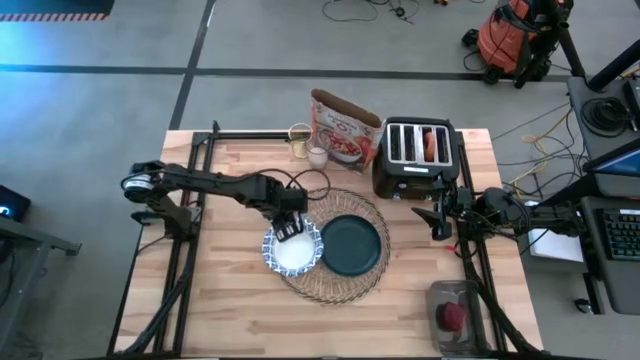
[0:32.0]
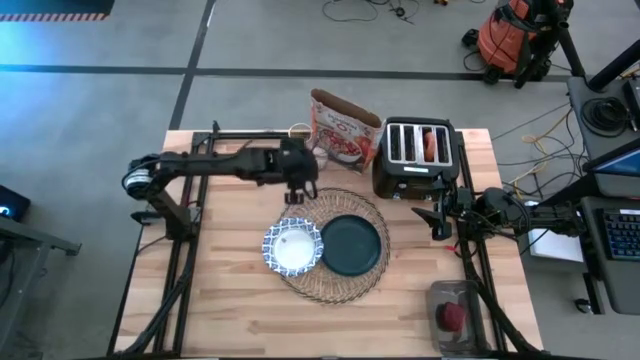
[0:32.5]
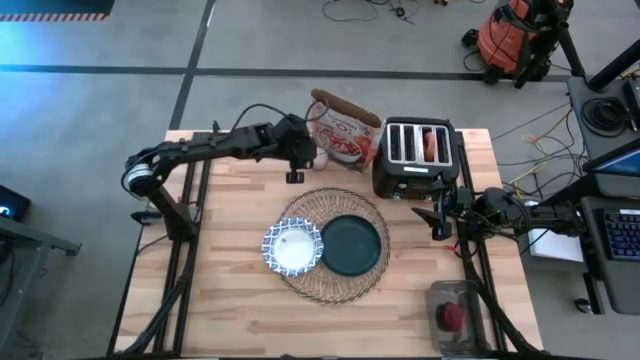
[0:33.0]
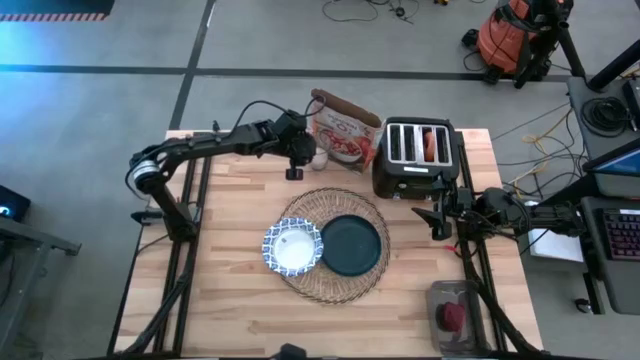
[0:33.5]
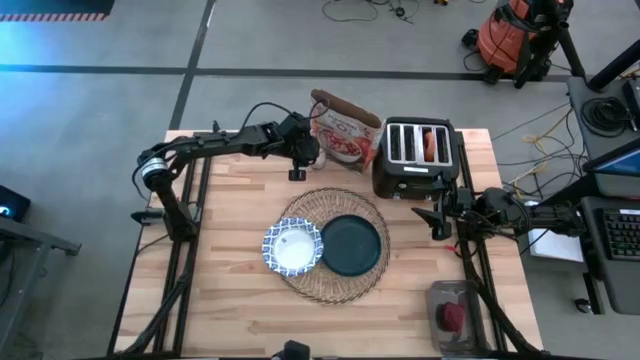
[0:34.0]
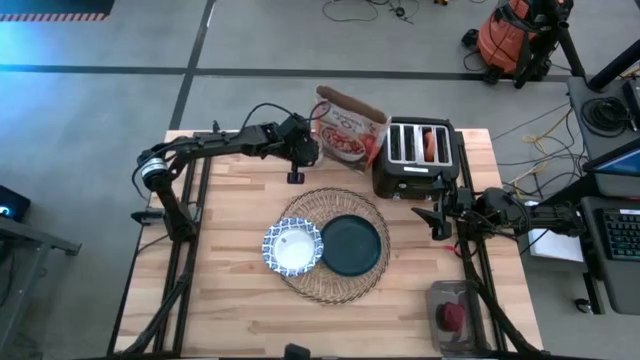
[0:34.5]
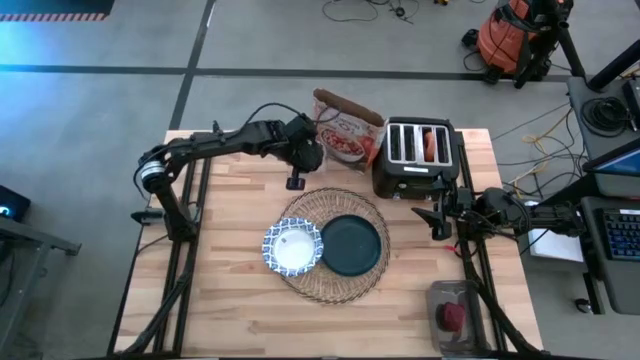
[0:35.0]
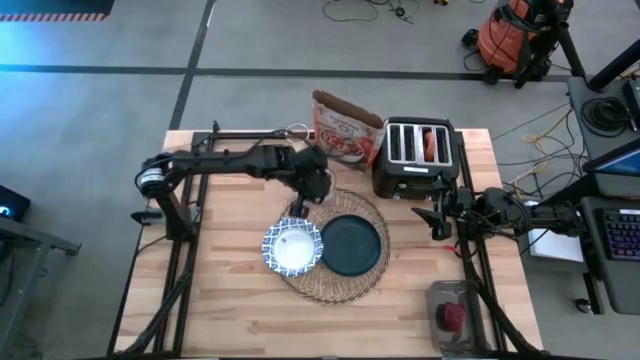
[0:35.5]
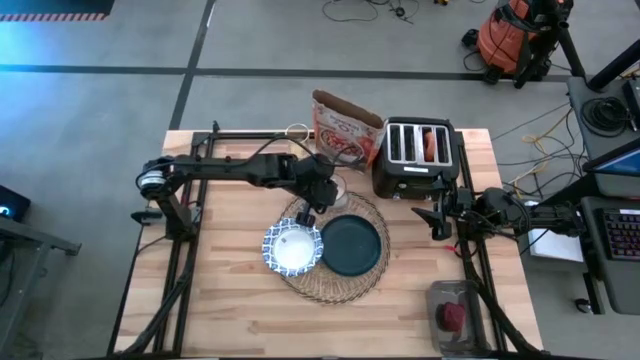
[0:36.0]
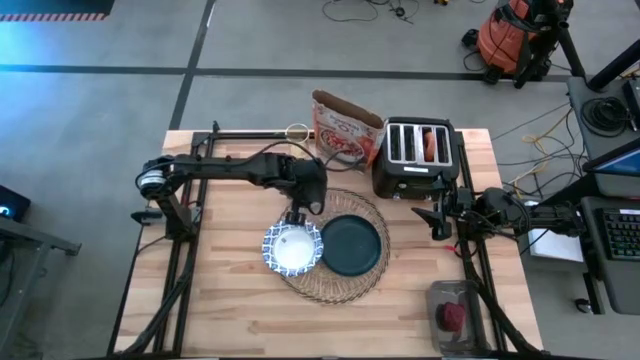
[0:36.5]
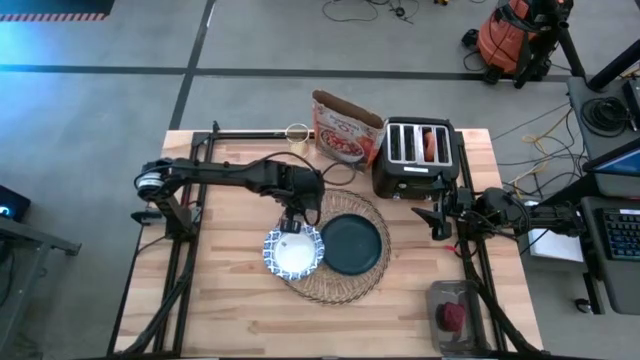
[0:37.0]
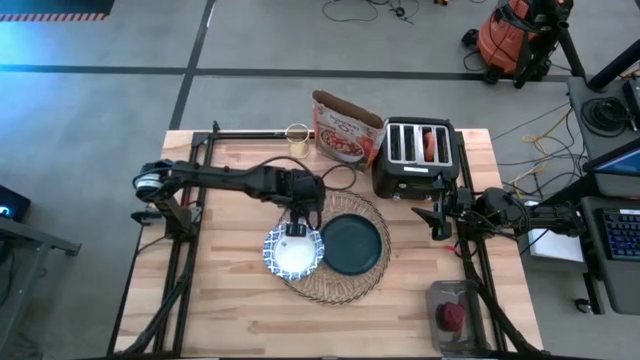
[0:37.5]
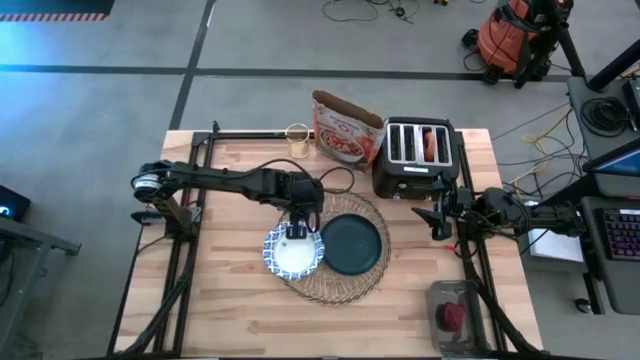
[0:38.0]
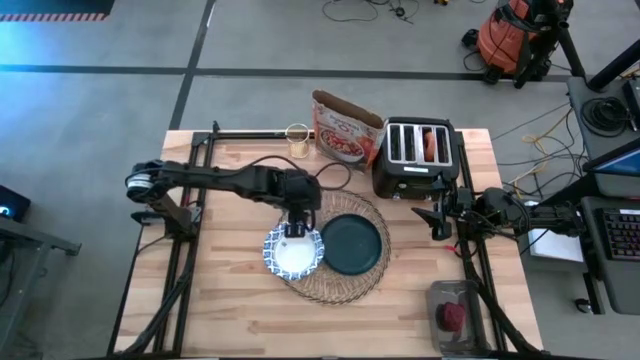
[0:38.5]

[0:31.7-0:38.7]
Task: Arrange a breakfast setting
Put the cup of milk on the brown placemat to the top of the white bowl

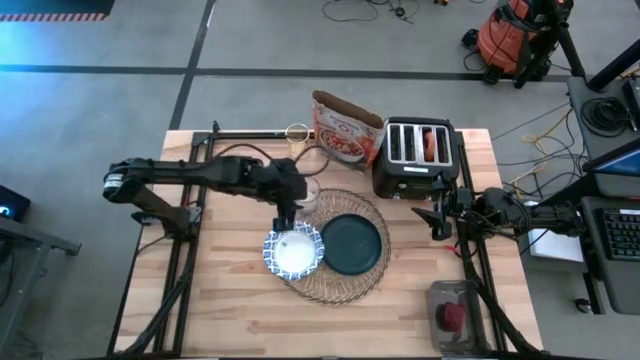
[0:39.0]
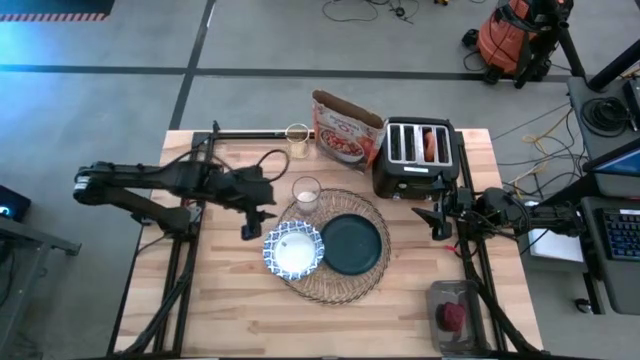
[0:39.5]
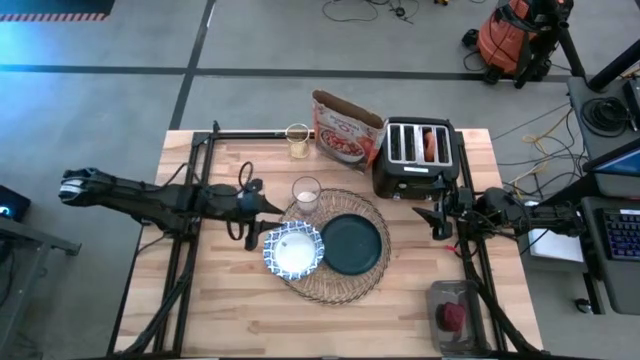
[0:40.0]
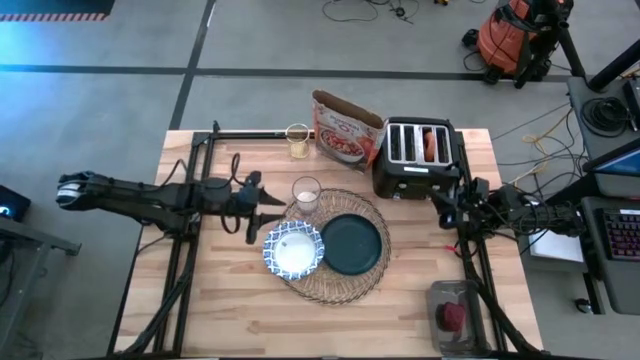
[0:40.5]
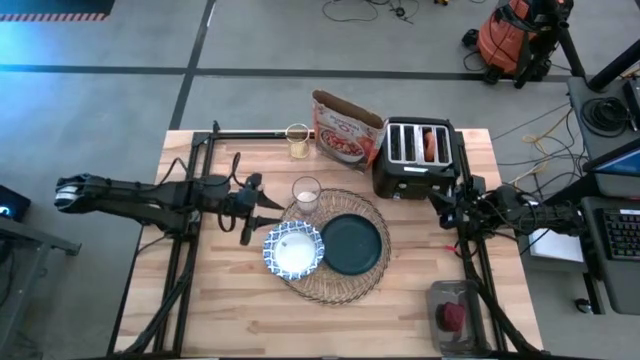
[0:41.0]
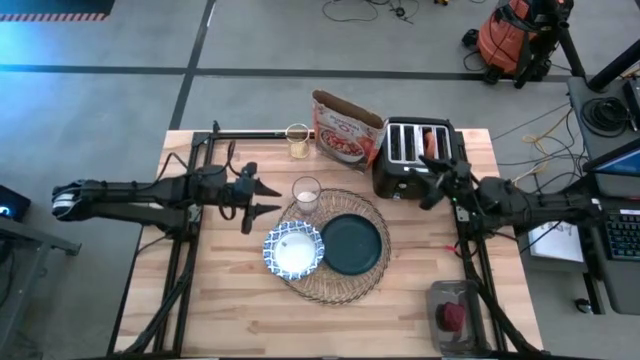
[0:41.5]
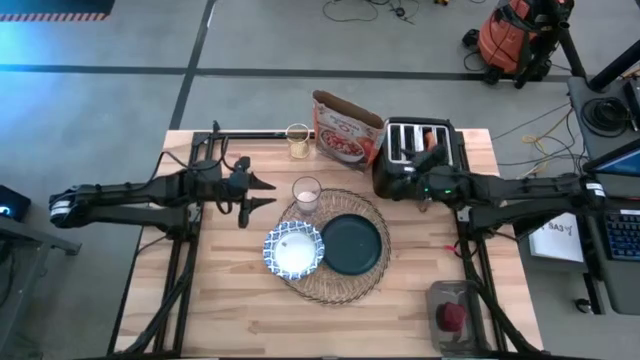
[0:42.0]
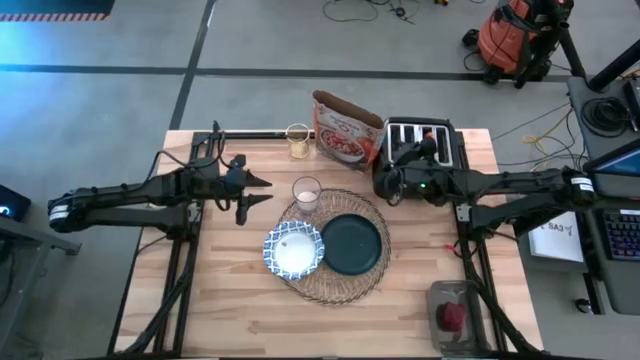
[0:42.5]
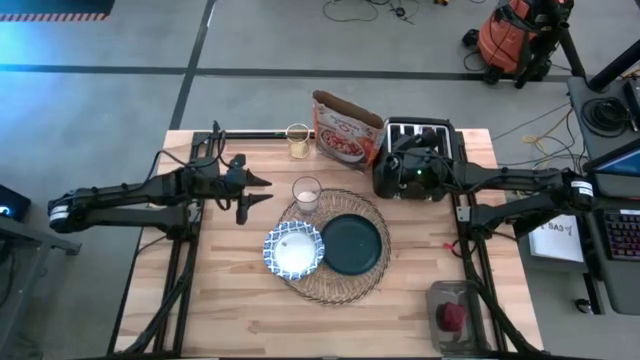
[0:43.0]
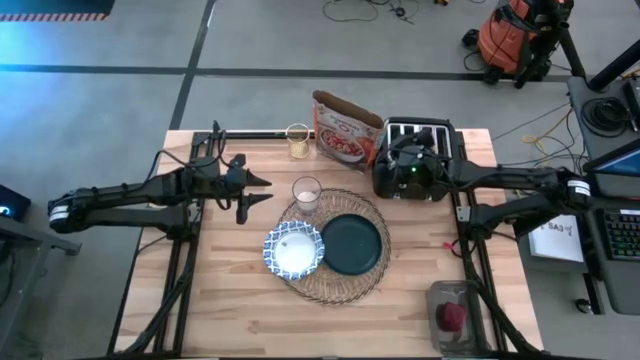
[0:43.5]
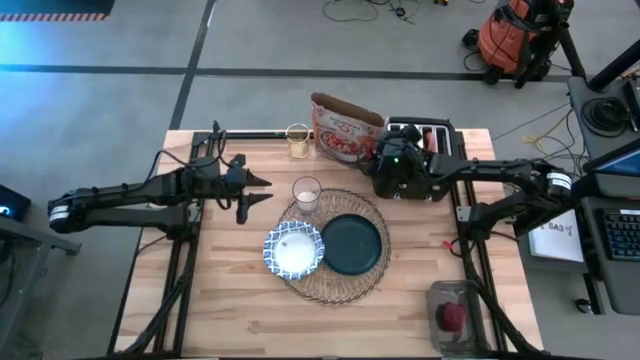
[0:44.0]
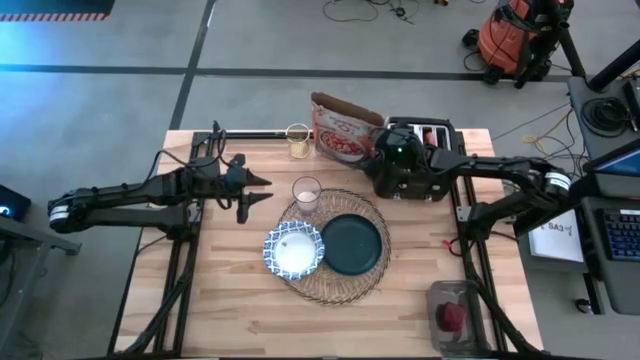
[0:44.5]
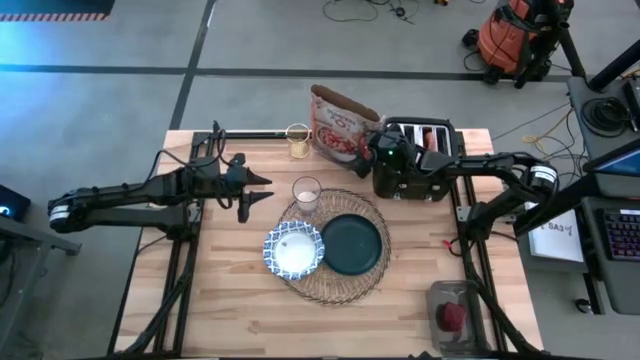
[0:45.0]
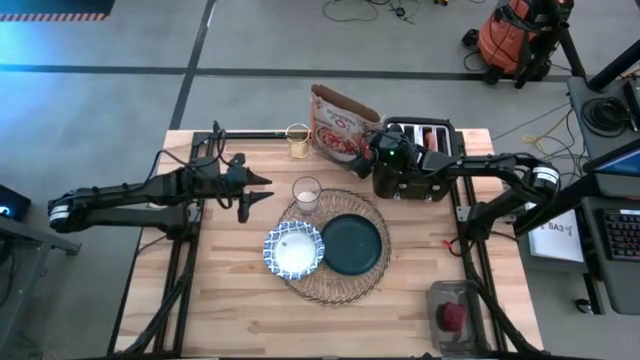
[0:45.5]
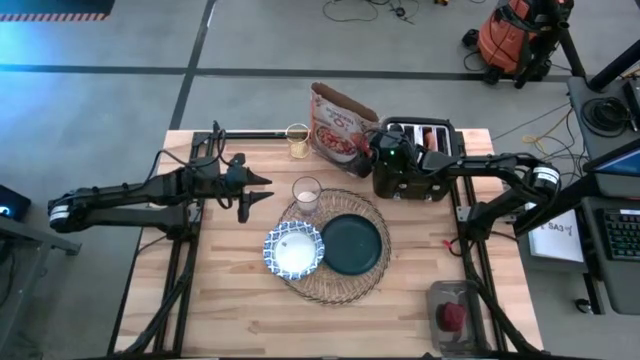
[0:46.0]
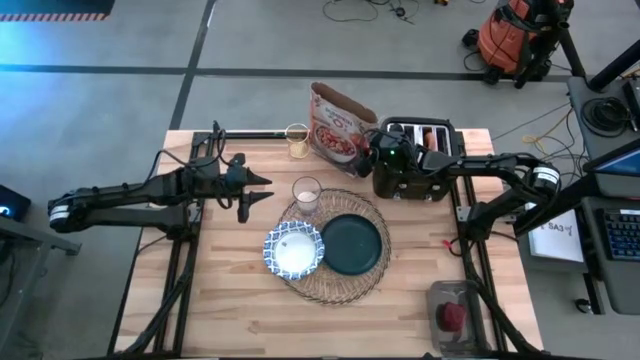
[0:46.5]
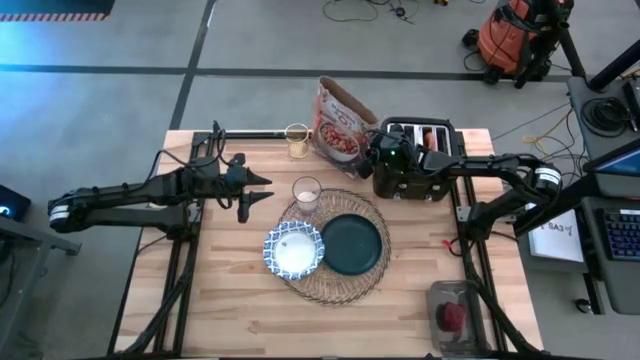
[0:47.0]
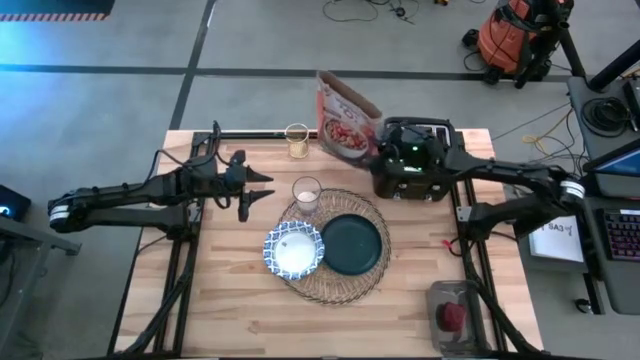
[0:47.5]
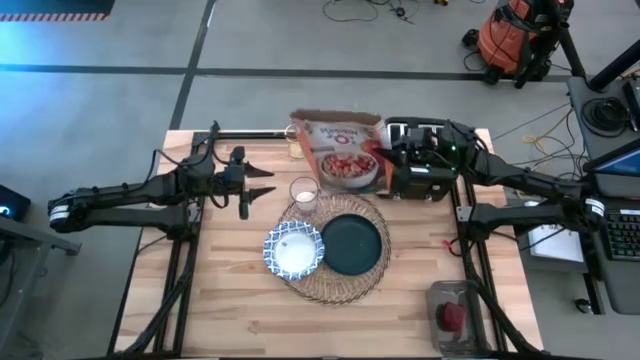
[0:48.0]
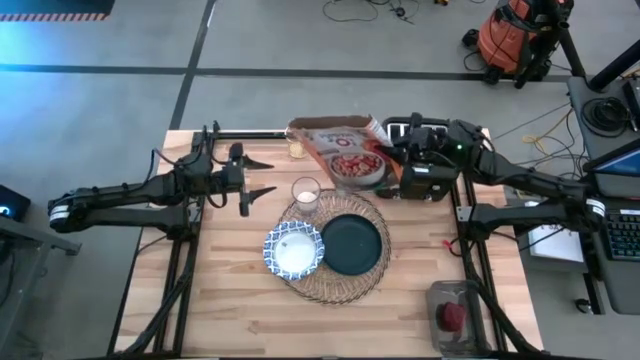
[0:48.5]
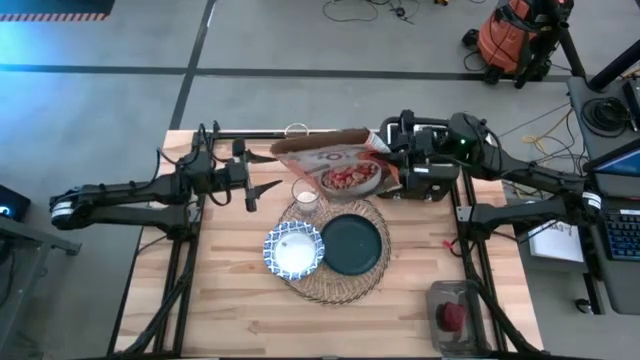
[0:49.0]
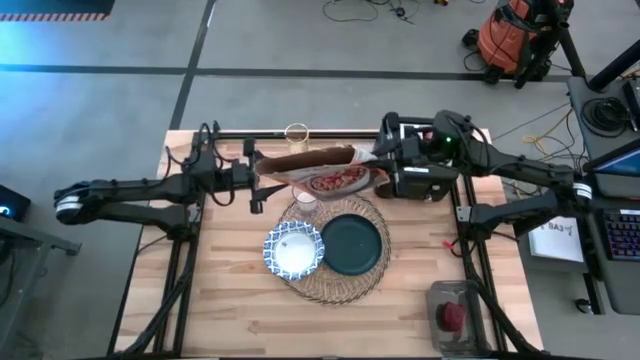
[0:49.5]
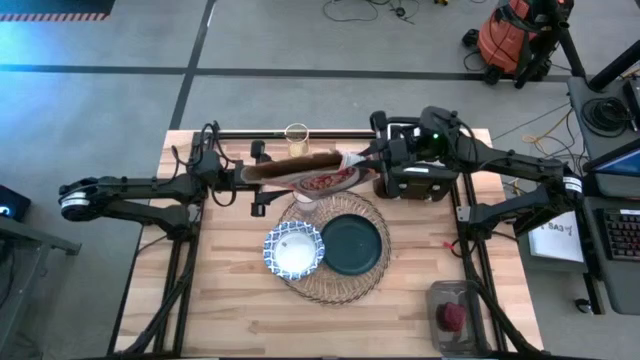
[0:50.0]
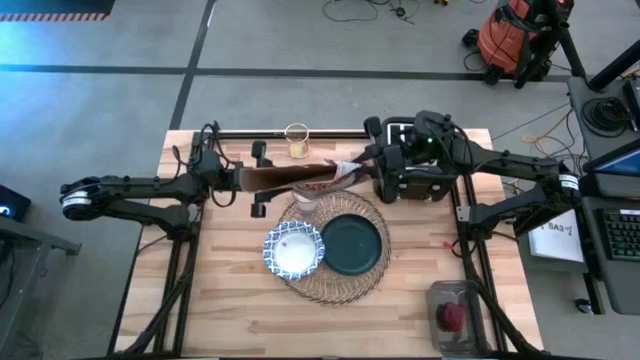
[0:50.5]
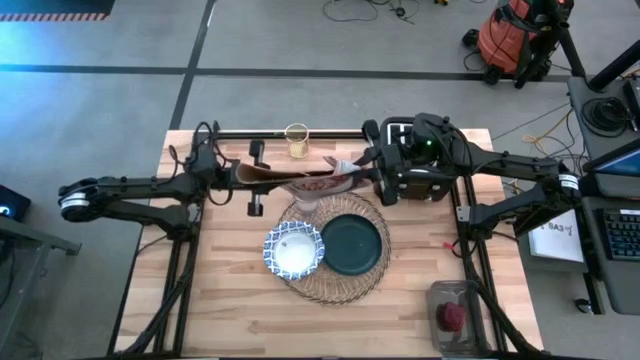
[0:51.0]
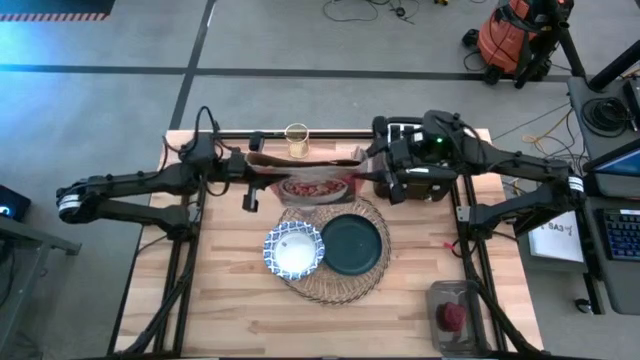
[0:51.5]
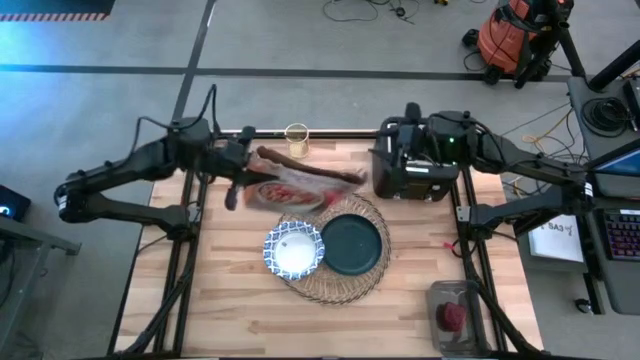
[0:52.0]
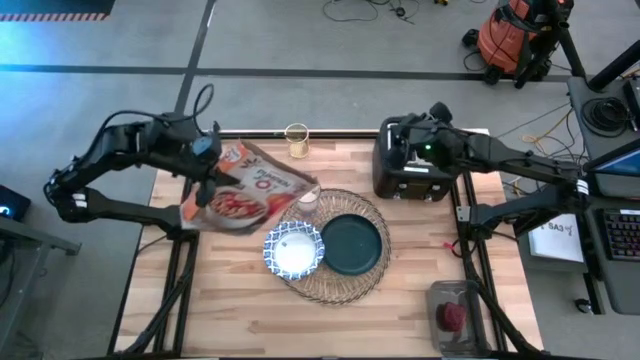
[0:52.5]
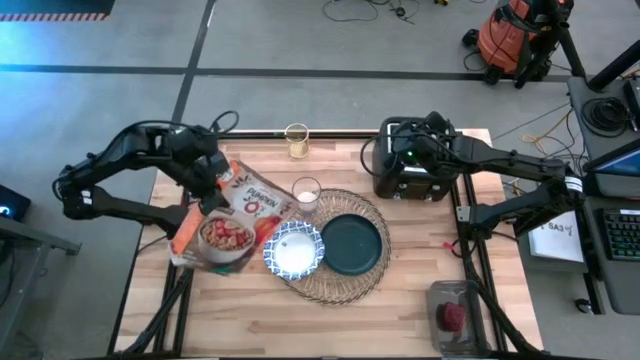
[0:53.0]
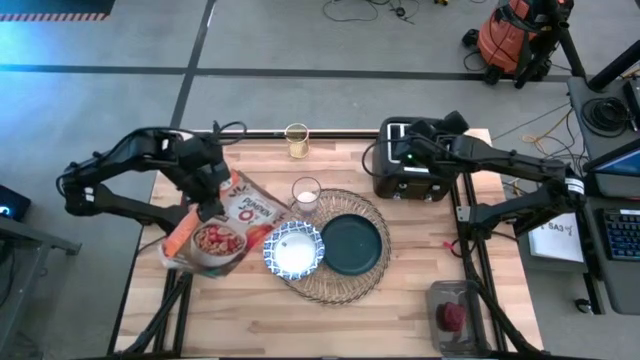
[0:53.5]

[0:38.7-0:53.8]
Pour the cereal from the orange cereal box into the white bowl
